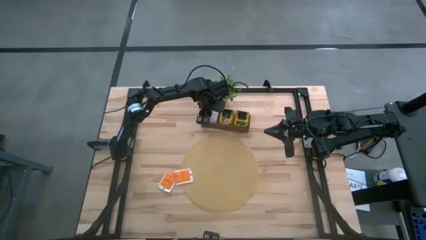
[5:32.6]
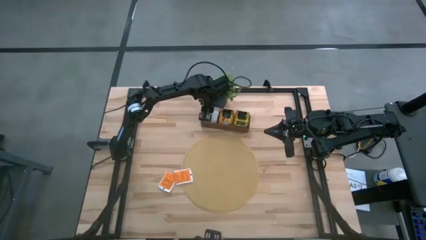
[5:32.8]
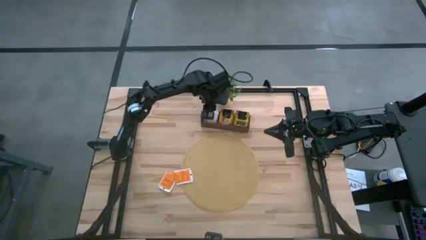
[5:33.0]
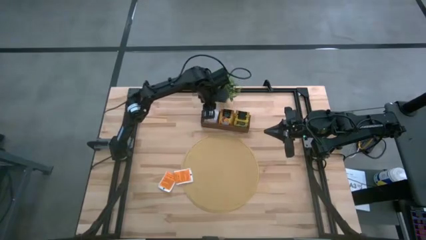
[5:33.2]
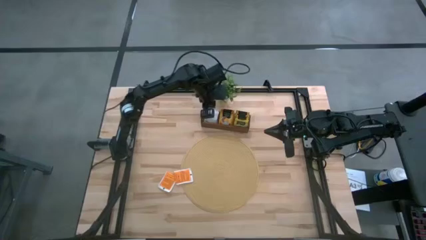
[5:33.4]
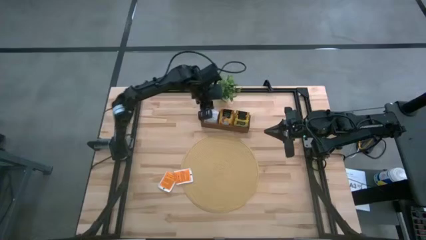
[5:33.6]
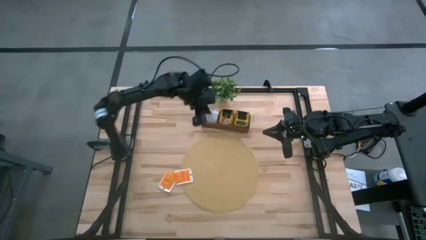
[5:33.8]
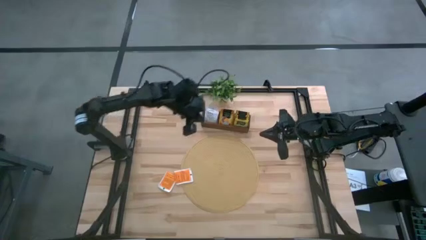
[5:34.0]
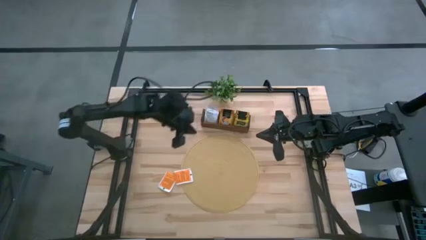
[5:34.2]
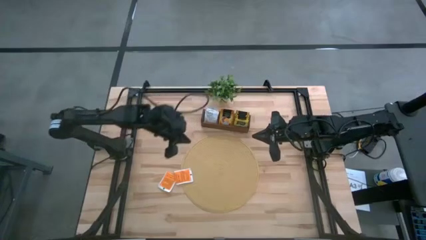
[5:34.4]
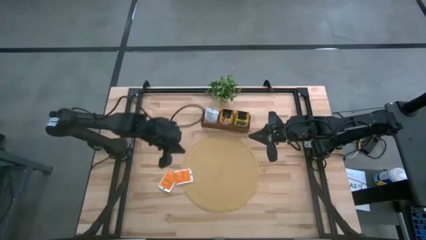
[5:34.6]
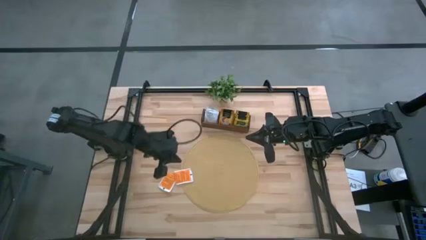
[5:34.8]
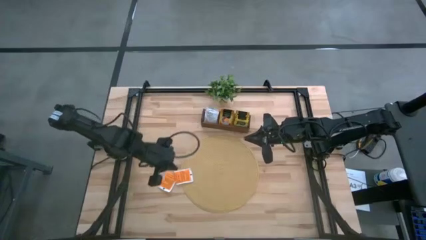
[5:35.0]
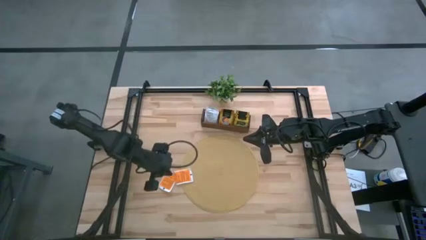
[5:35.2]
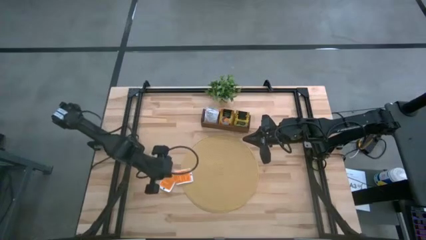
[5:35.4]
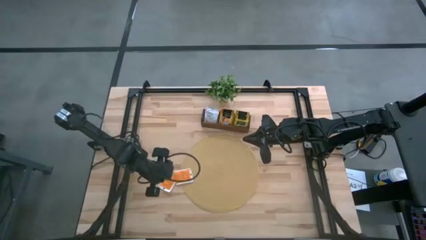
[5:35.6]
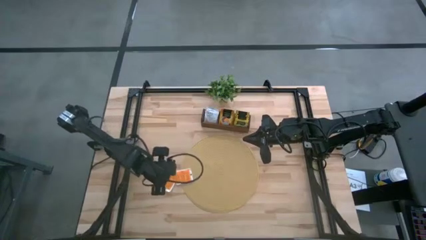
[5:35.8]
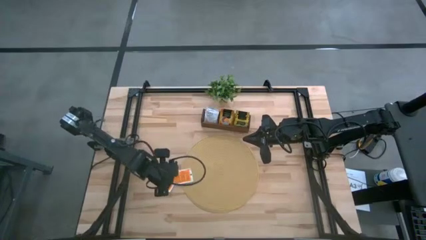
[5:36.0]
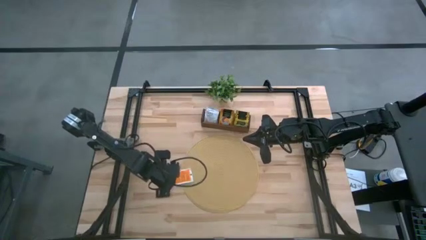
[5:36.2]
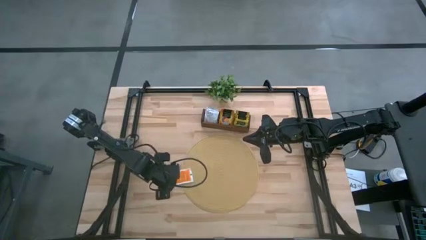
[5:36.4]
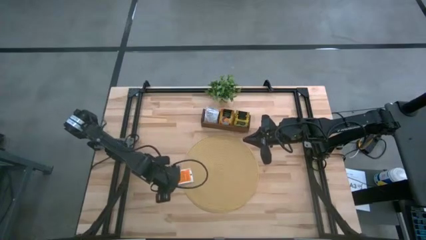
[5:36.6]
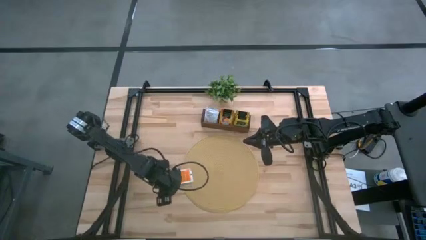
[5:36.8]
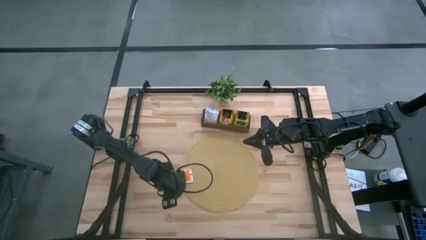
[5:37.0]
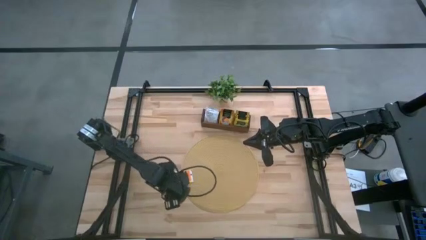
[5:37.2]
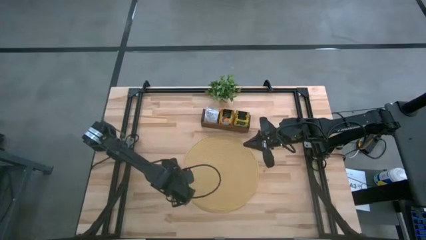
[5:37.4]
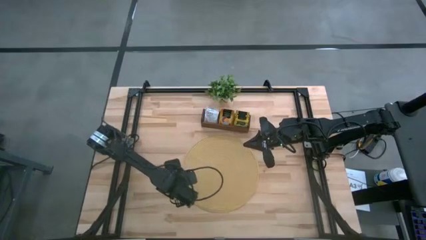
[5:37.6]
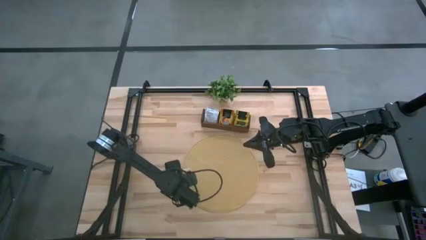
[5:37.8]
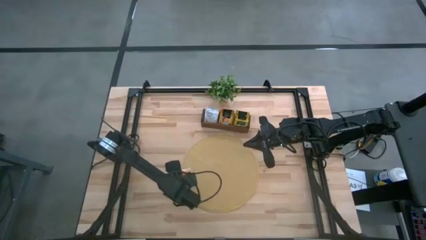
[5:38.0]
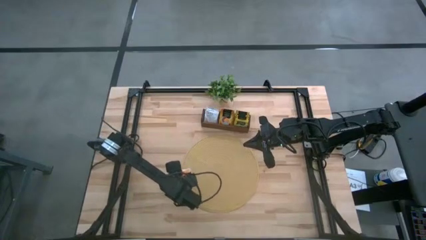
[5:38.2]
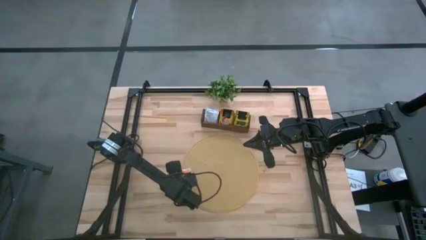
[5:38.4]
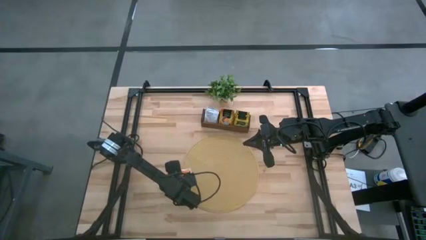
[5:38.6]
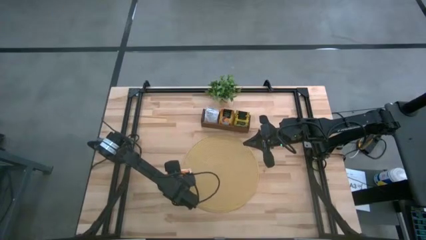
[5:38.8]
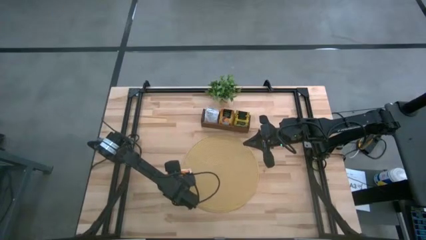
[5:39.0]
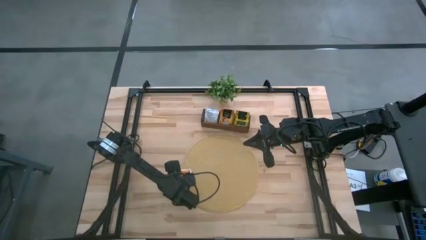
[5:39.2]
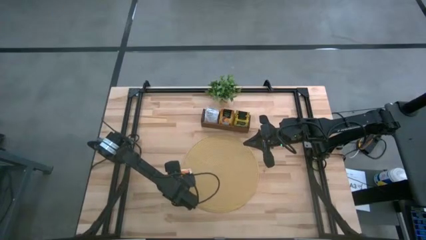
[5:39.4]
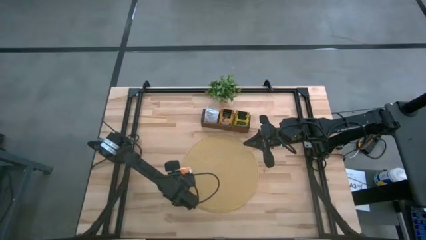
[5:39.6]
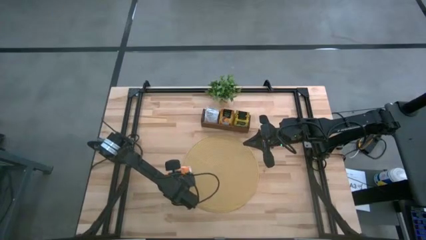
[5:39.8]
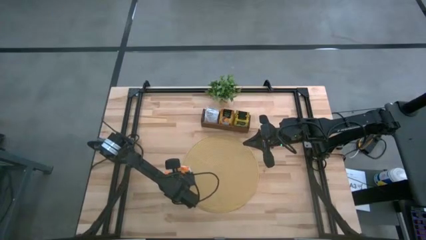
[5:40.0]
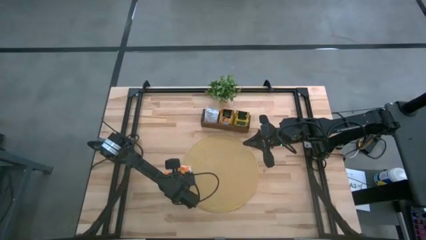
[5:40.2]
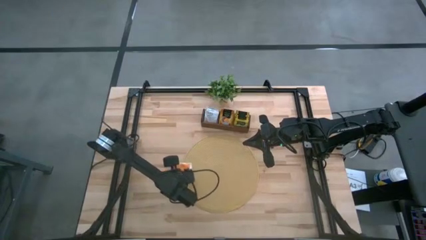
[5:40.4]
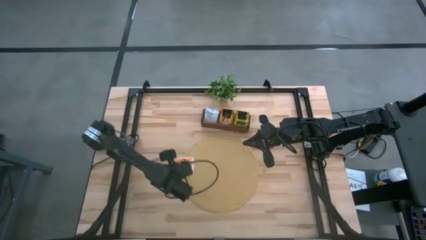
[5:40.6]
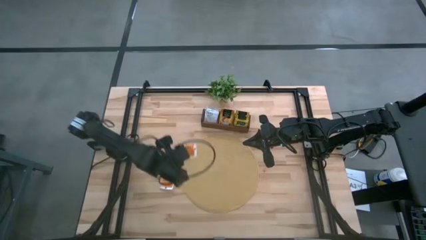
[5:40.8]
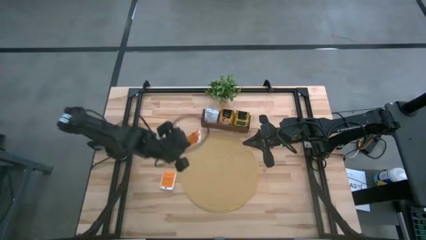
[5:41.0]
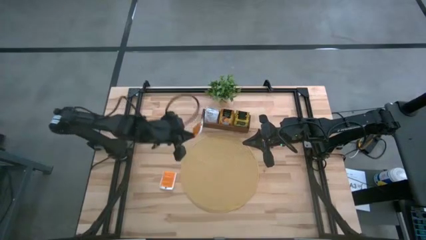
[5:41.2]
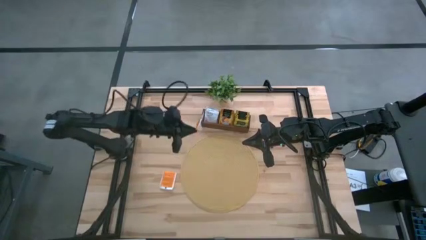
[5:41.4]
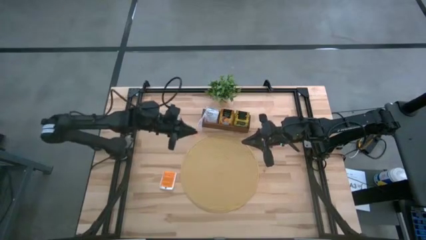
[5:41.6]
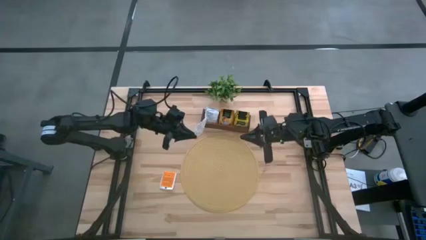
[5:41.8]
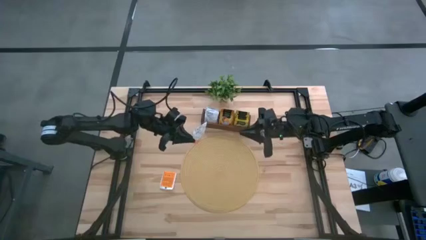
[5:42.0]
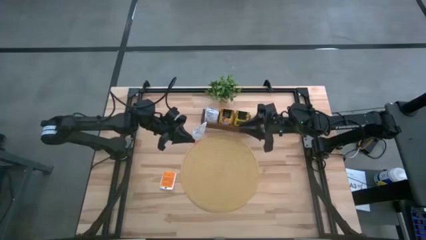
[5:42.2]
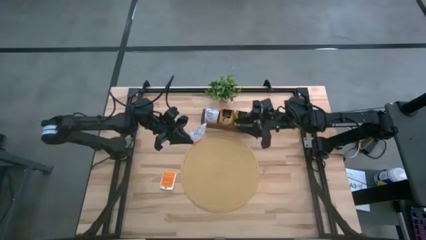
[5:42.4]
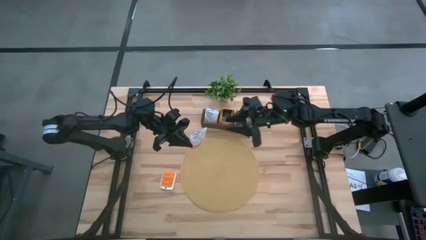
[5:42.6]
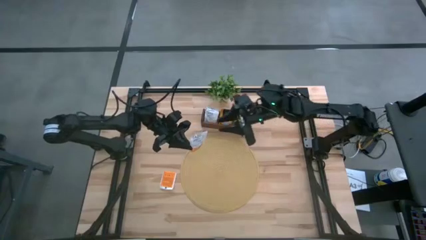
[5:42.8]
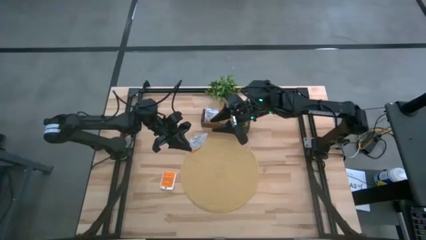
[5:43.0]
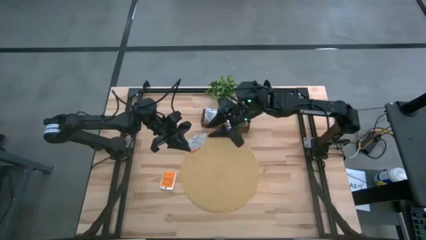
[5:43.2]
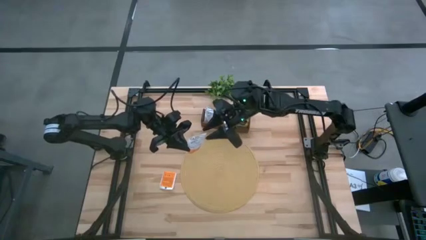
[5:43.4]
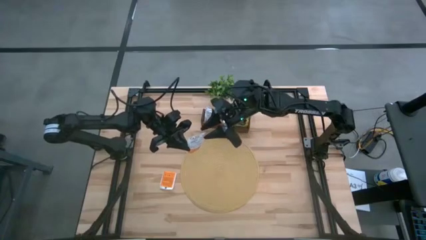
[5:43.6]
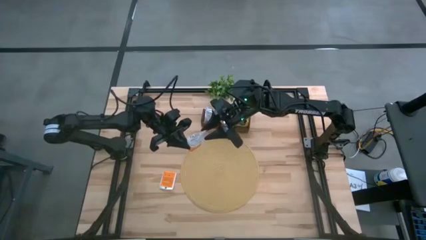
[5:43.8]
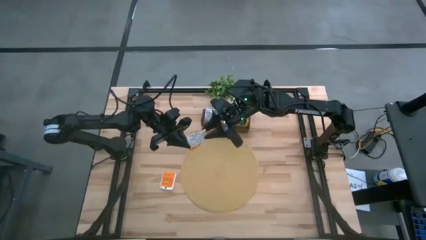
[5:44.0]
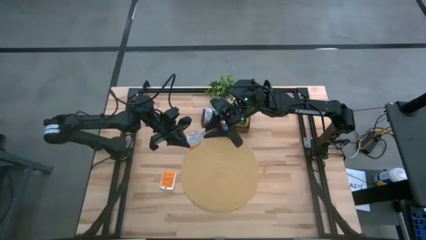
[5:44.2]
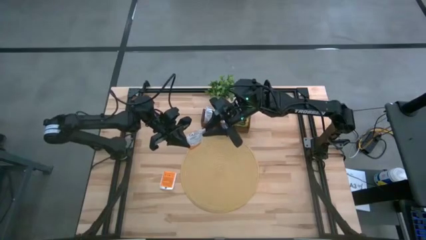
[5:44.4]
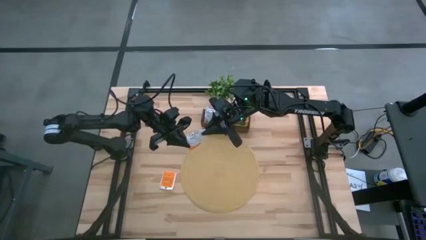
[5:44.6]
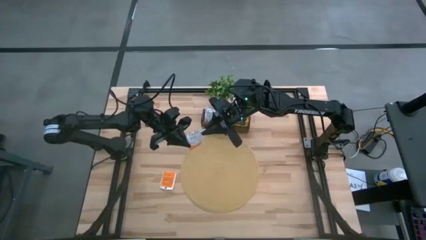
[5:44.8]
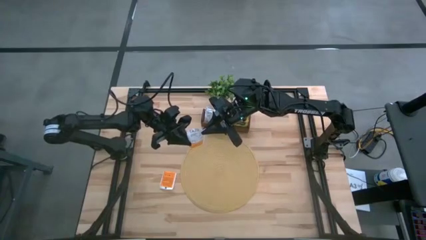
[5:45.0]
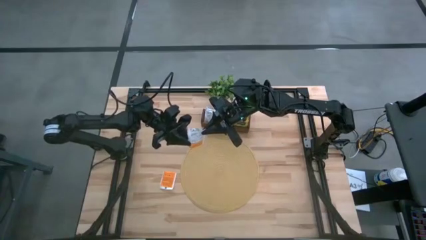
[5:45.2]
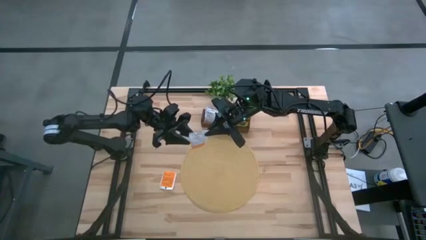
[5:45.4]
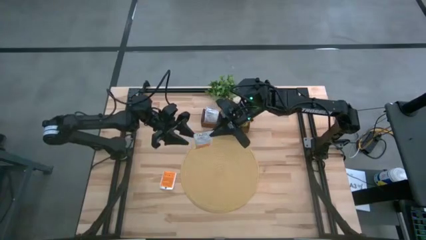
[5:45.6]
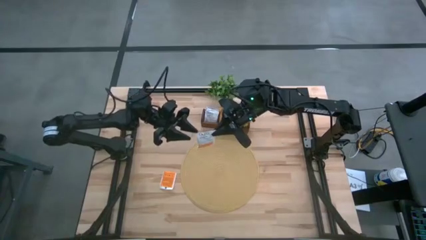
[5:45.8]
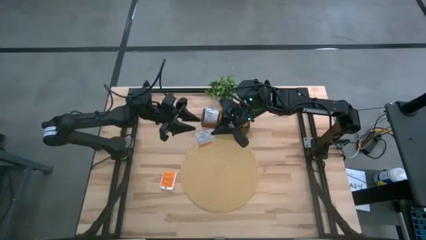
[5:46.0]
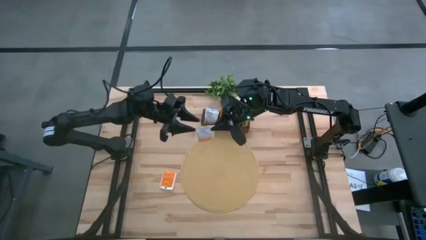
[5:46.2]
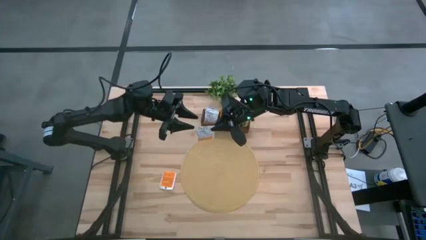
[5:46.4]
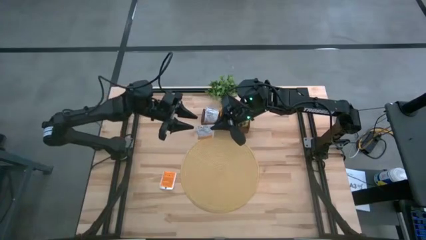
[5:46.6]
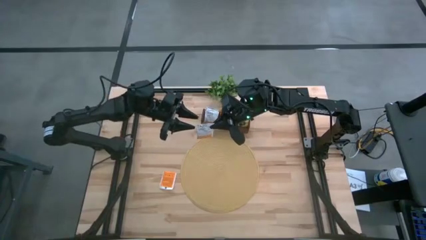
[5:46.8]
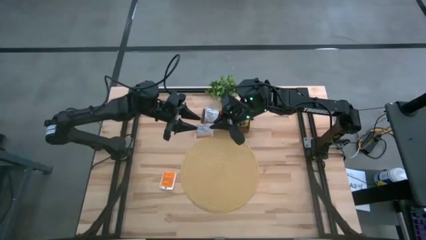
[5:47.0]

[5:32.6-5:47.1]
Task: Pick & Place Tea
Put the white tea bag into the left section of the wooden organizer

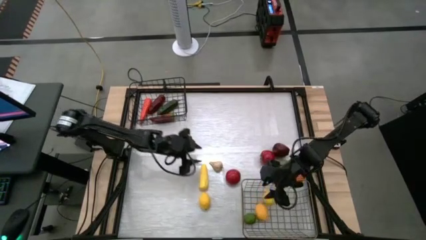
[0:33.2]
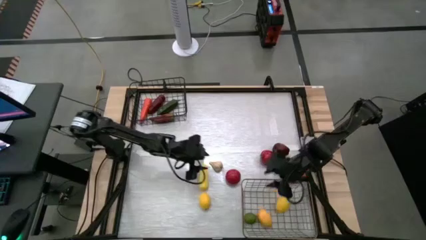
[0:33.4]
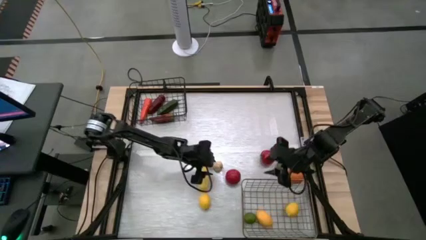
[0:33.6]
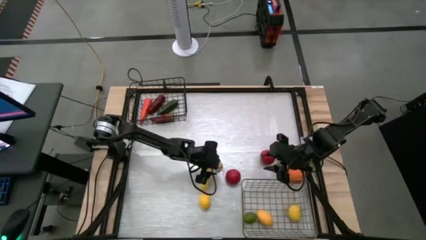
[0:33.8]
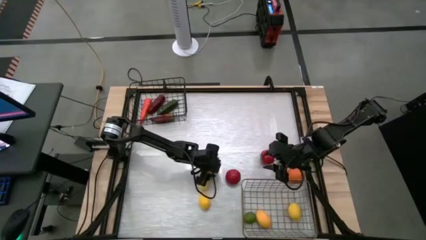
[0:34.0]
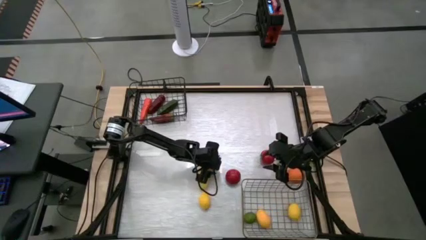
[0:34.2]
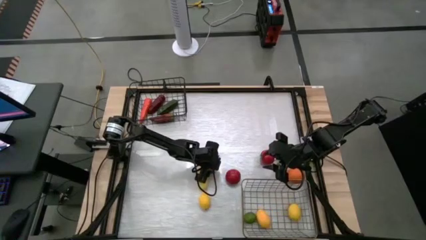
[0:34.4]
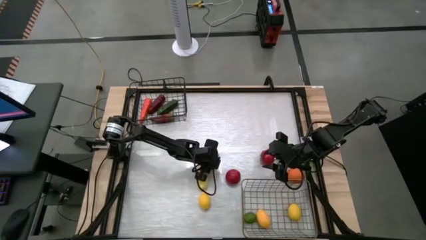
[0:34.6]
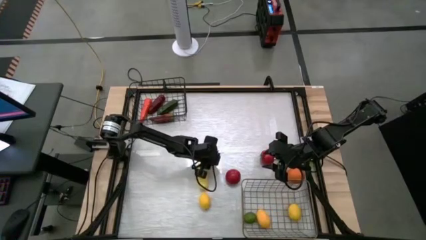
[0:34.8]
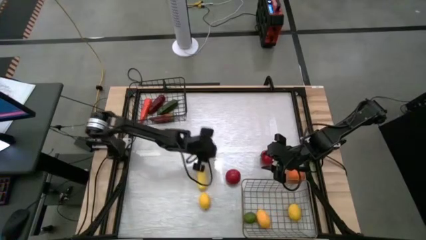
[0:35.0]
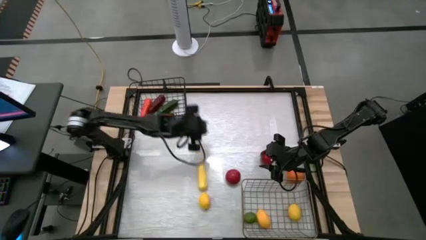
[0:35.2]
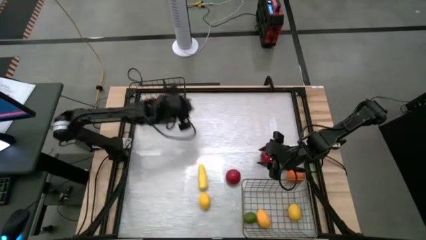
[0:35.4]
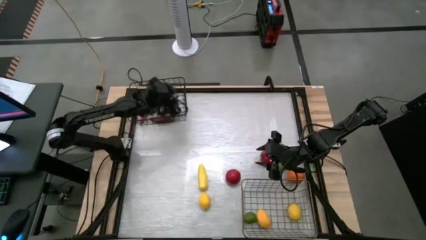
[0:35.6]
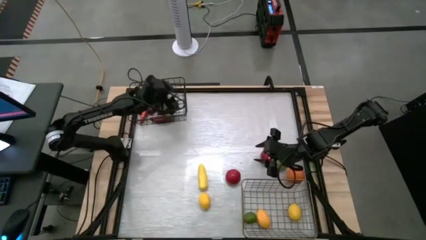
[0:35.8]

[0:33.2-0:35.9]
Task: Sort produce into baskets
Put the garlic into the black wire basket
